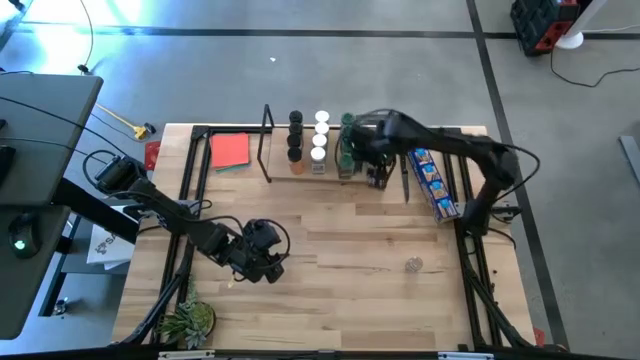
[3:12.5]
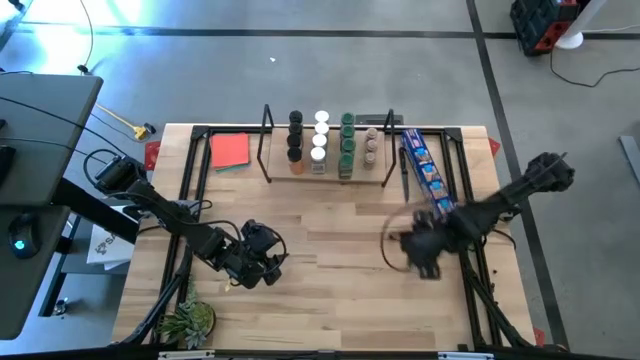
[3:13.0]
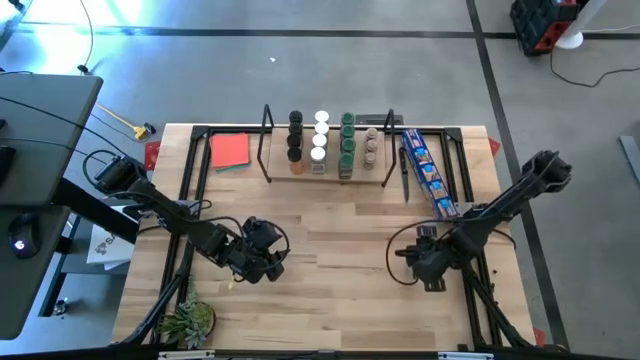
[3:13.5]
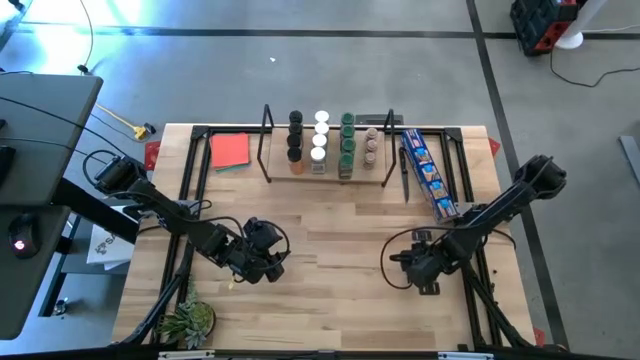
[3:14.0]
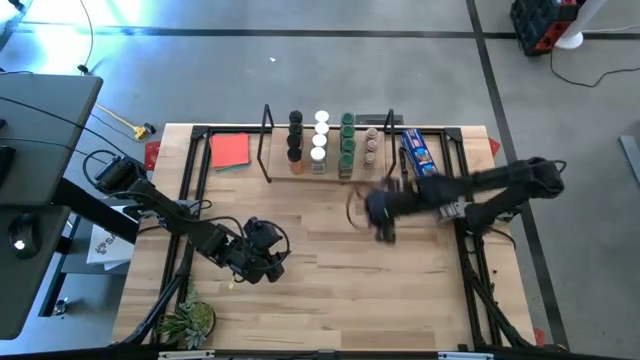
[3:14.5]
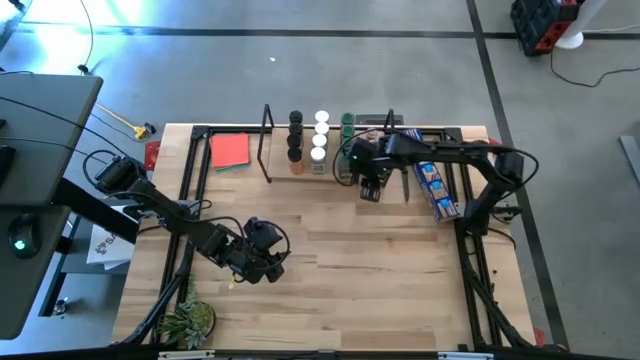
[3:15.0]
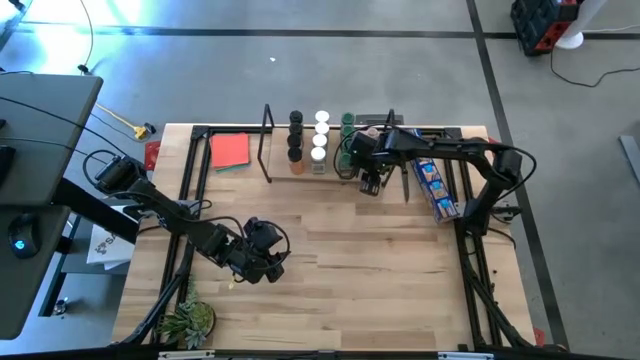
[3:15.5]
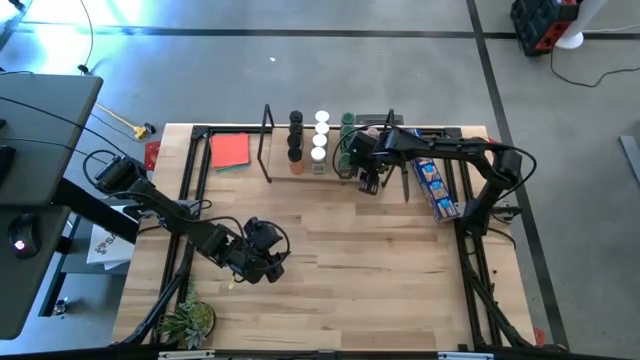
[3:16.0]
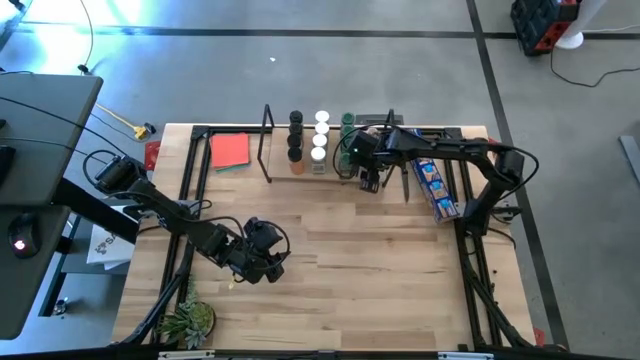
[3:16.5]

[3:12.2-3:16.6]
Task: Shelf spices
Put the brown seasoning bottle on the shelf aligned with the other brown seasoning bottles

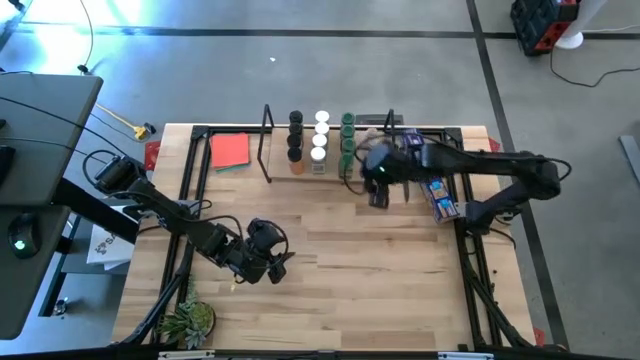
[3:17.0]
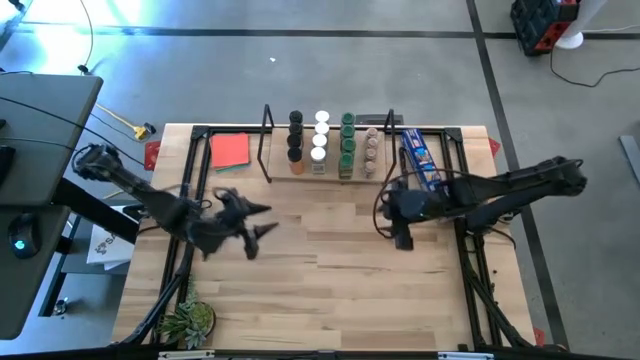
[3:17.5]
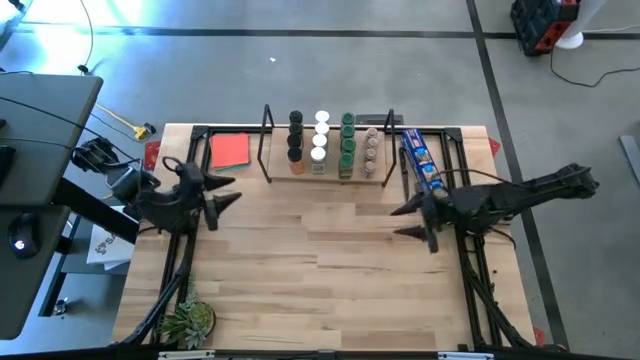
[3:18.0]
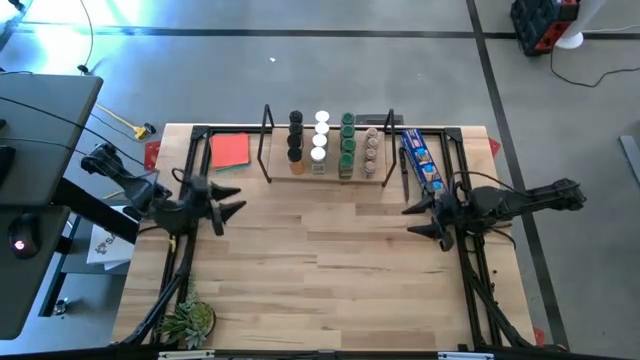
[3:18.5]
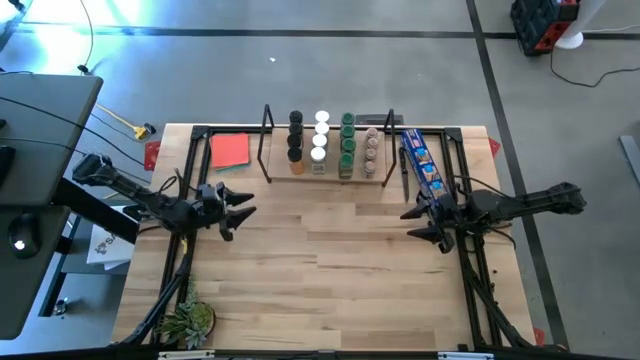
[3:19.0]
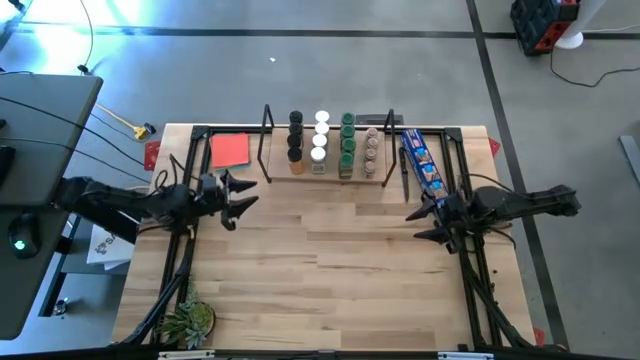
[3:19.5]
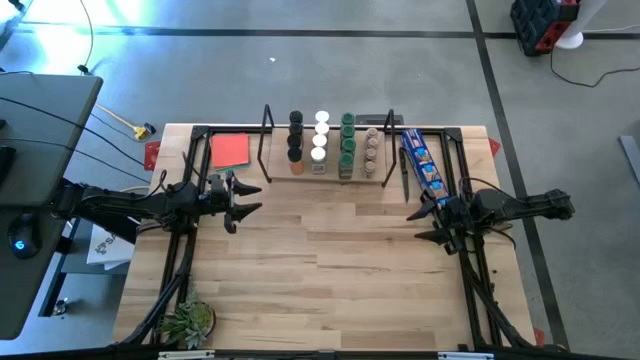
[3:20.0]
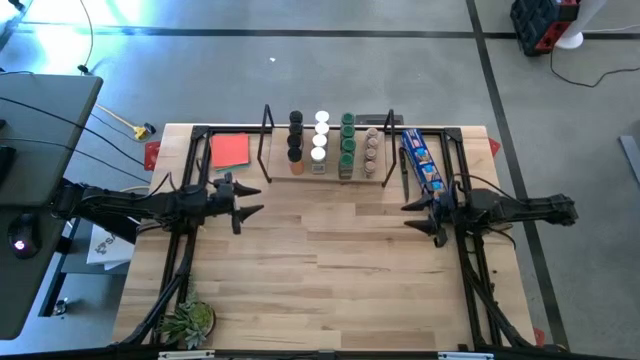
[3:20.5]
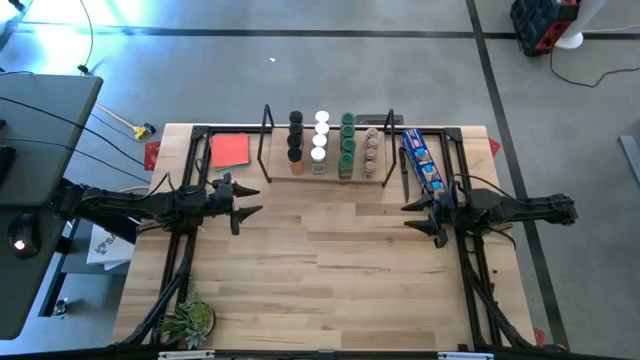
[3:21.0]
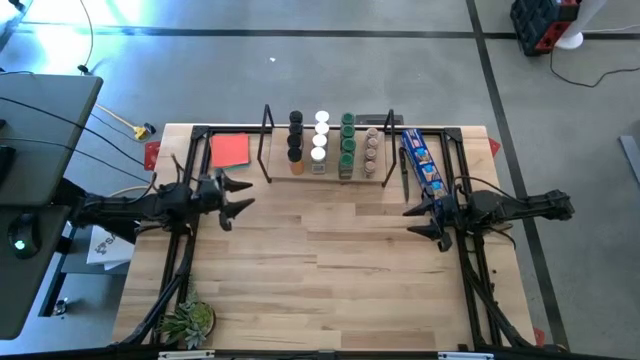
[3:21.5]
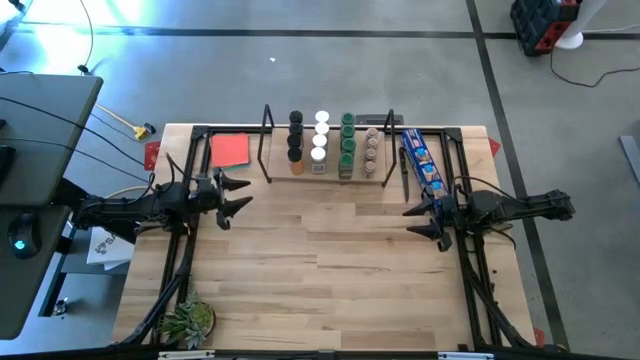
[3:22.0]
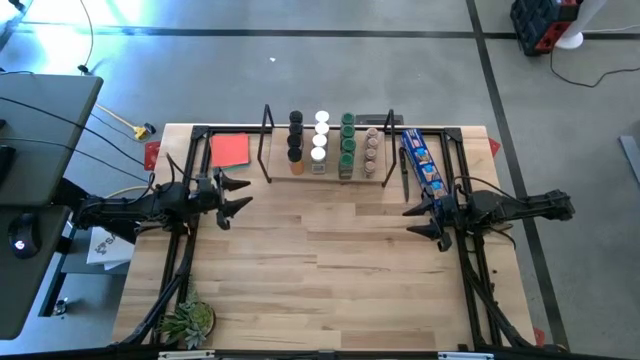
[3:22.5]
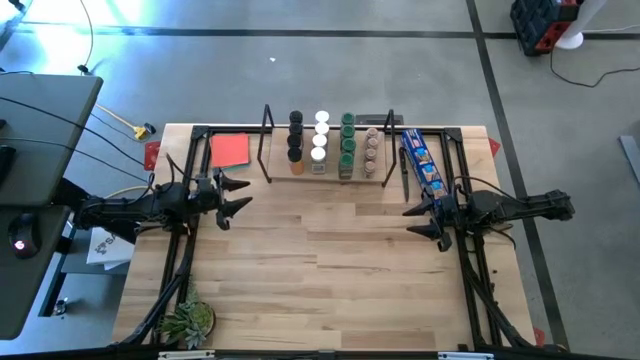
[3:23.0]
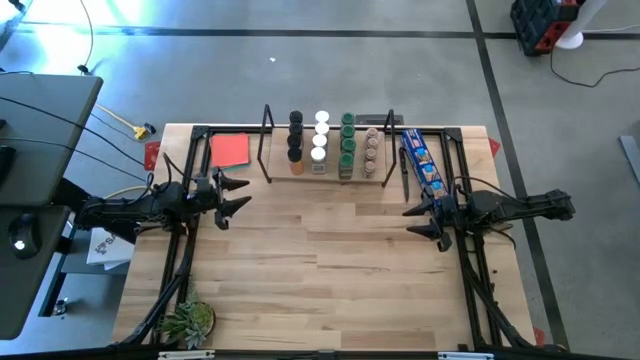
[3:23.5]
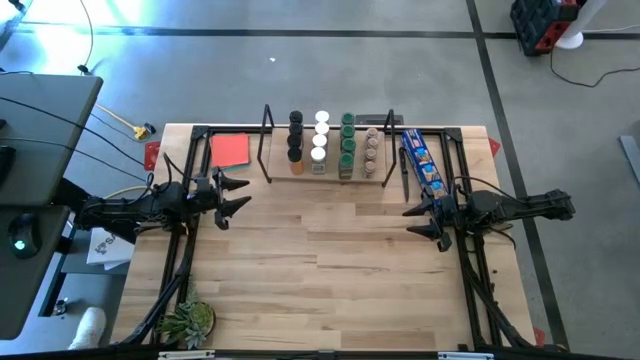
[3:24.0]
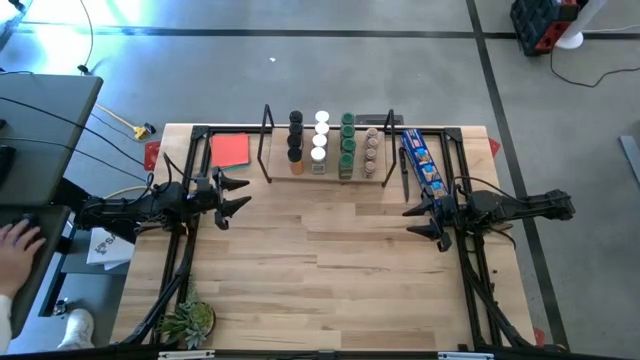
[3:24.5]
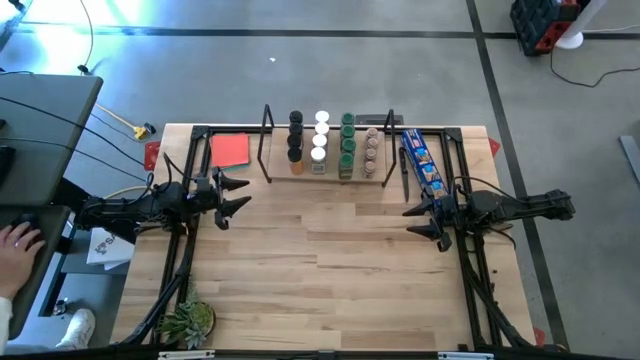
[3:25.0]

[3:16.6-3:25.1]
Return to Home Position

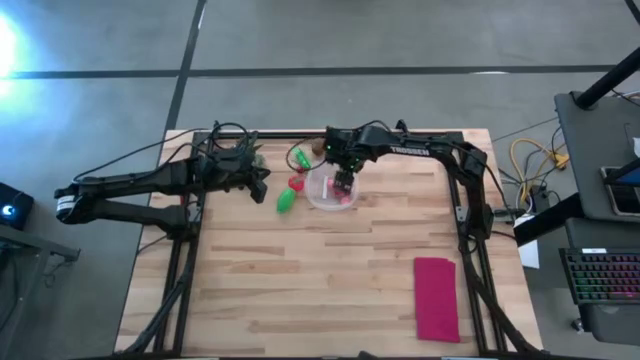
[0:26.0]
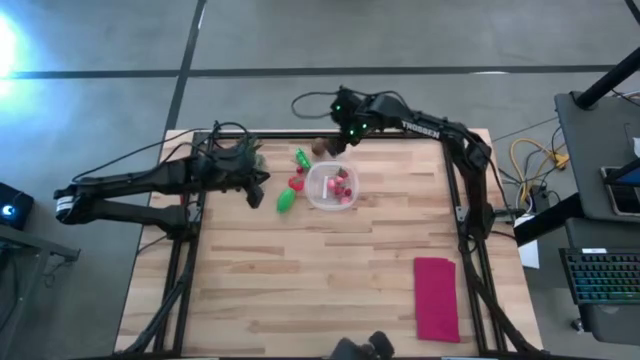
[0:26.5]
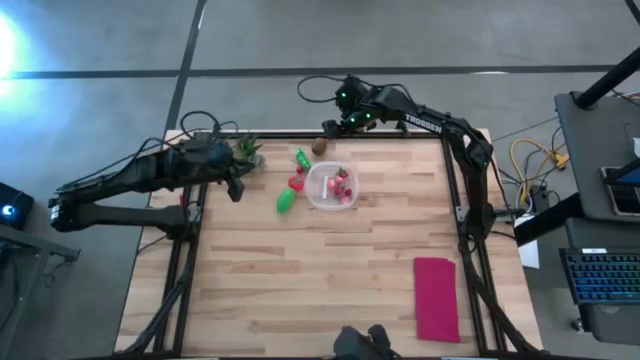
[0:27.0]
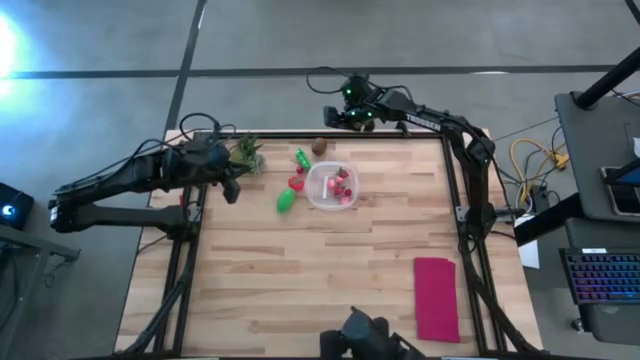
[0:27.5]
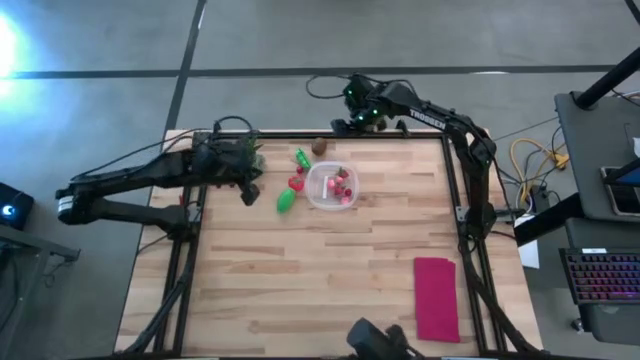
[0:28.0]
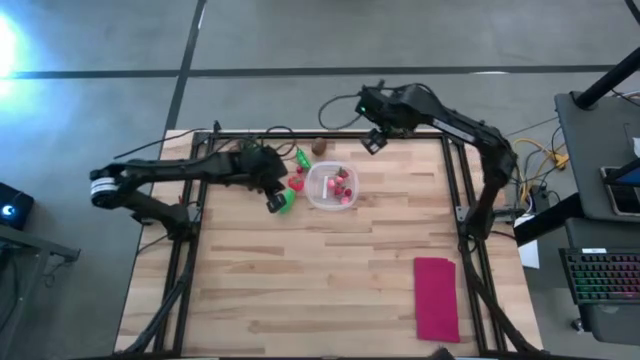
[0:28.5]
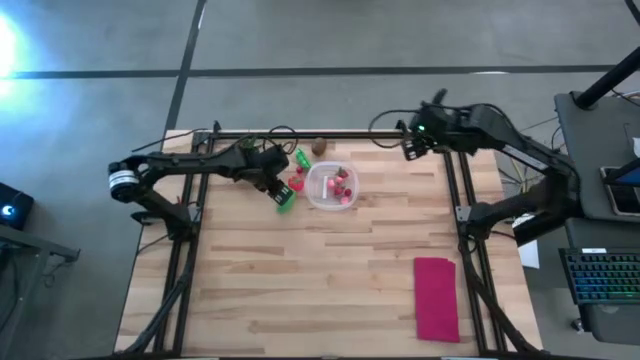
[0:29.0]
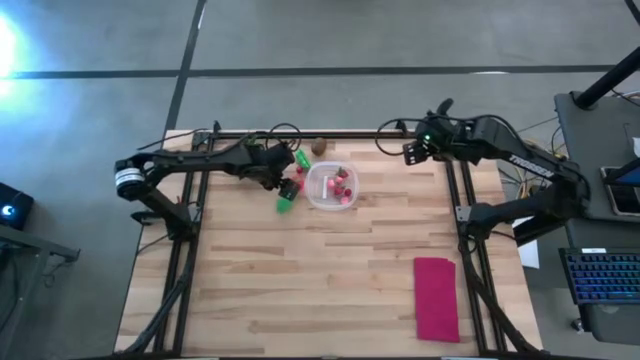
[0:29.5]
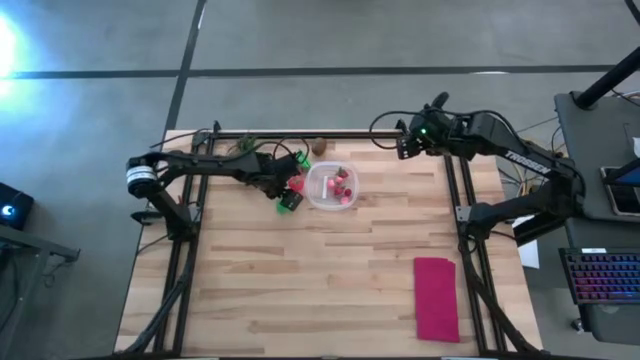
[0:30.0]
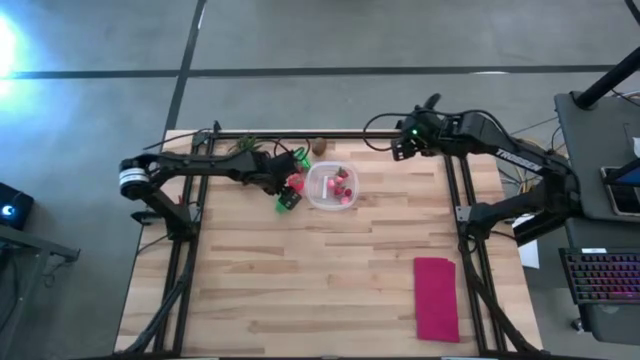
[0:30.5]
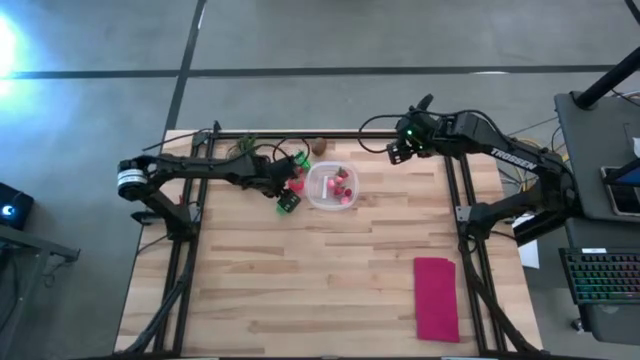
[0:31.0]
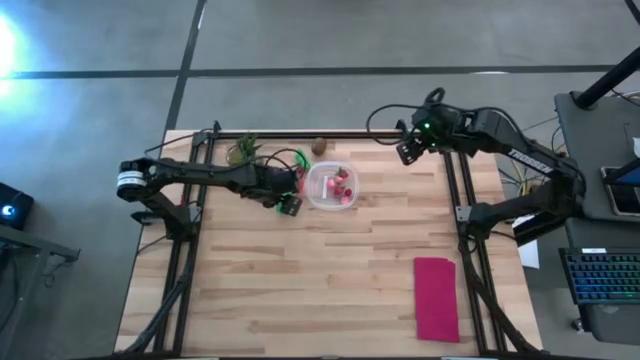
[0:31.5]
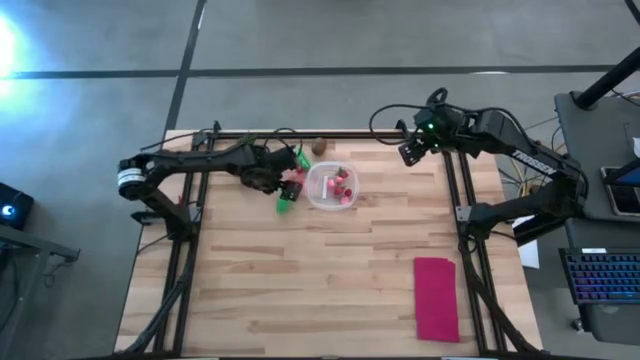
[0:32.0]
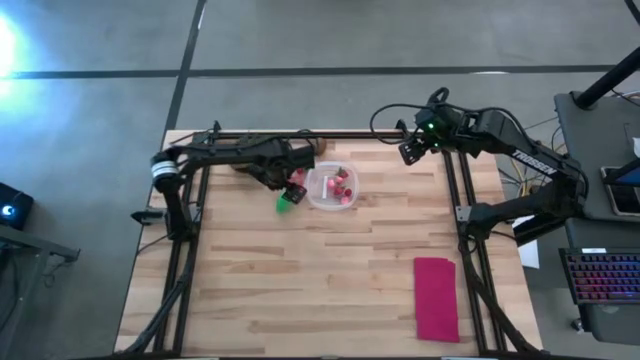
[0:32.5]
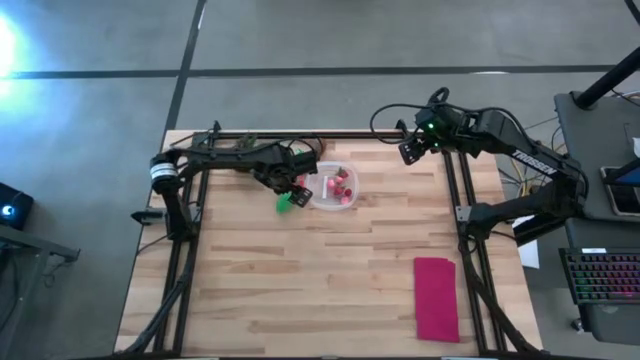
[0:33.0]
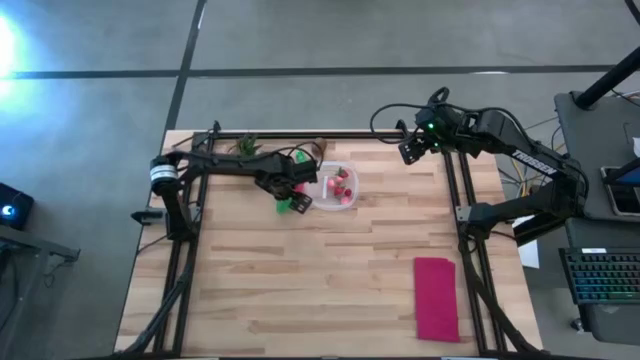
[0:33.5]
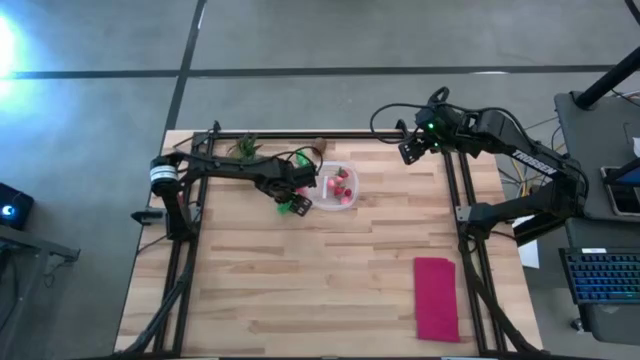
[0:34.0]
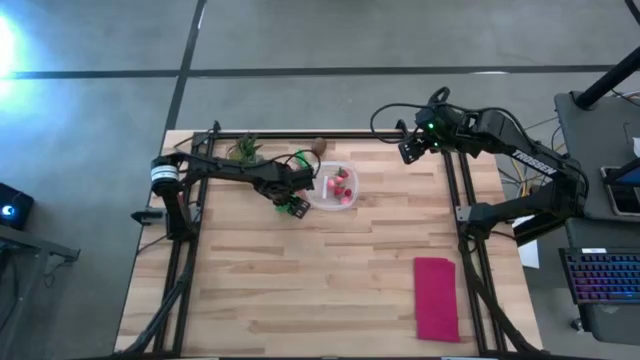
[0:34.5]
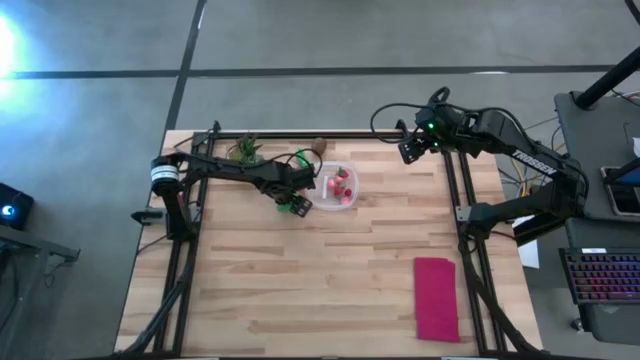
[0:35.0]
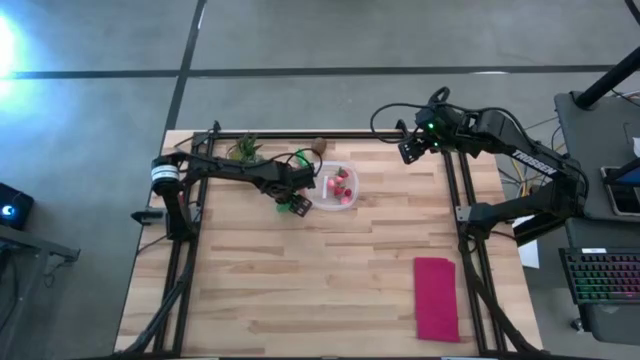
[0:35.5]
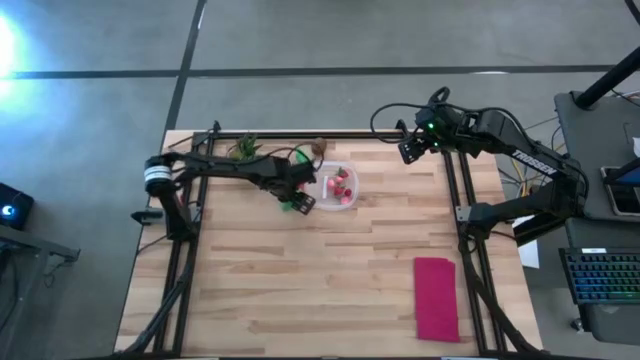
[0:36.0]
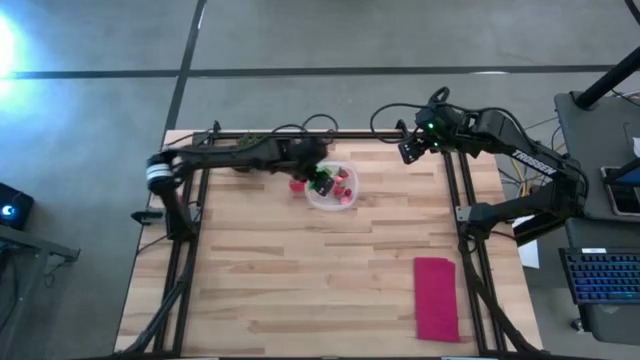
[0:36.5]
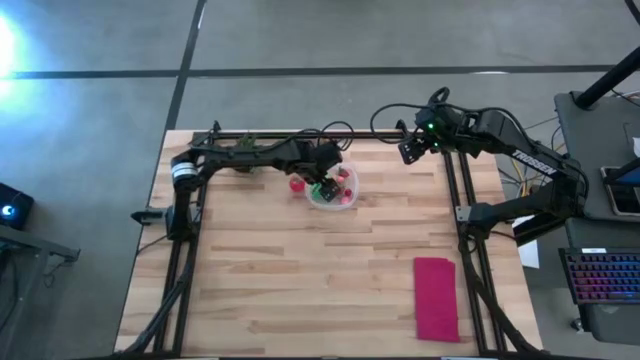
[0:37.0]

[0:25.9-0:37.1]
Task: Pick and placing Produce into tupperware
Put the corn into the transparent bin
